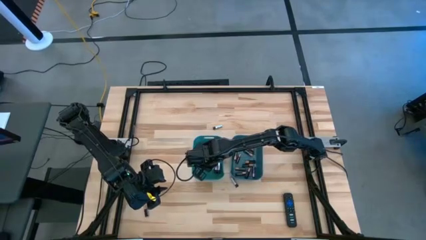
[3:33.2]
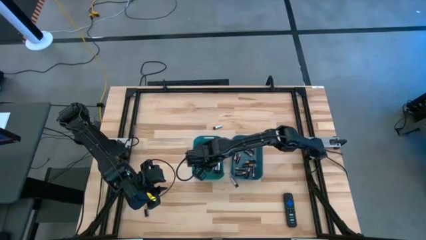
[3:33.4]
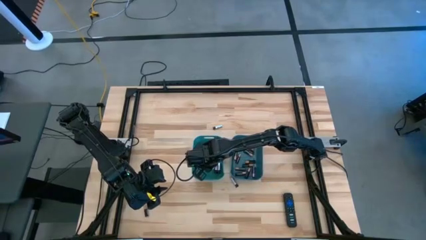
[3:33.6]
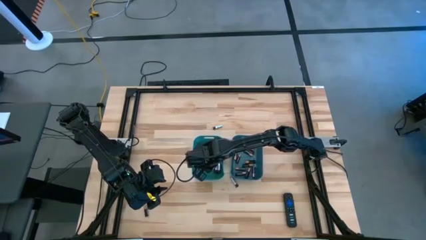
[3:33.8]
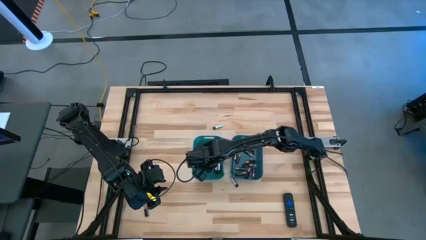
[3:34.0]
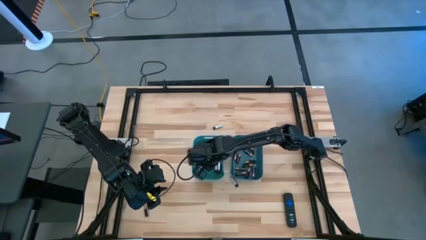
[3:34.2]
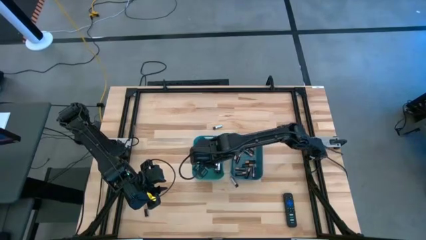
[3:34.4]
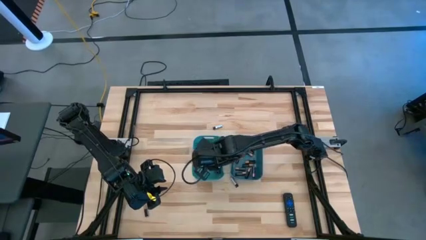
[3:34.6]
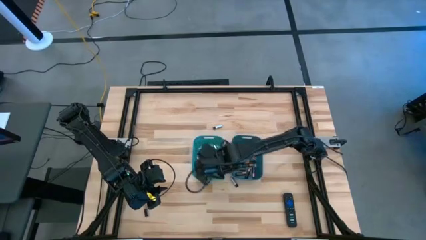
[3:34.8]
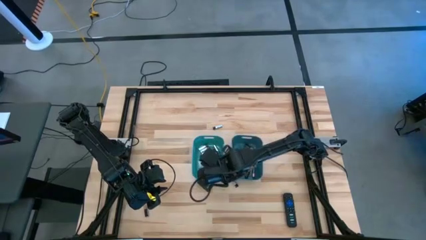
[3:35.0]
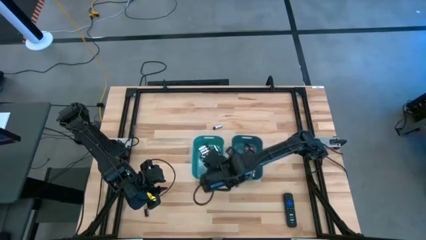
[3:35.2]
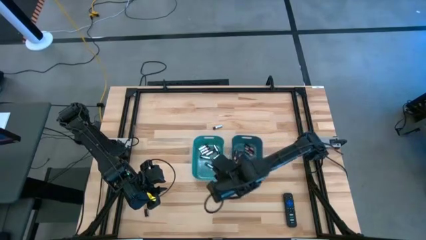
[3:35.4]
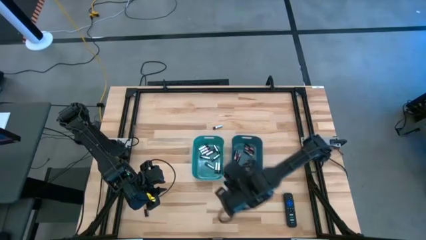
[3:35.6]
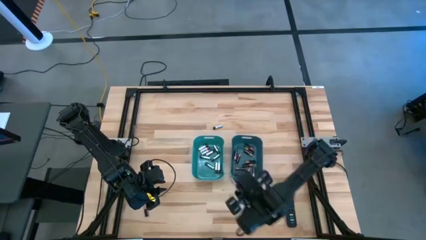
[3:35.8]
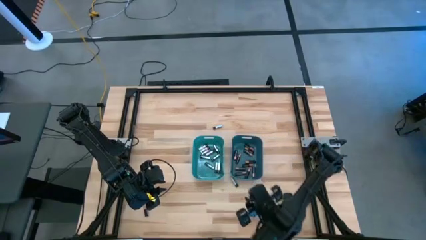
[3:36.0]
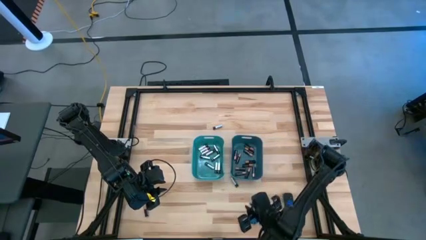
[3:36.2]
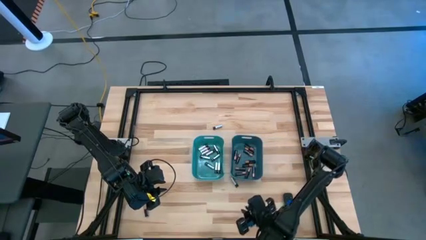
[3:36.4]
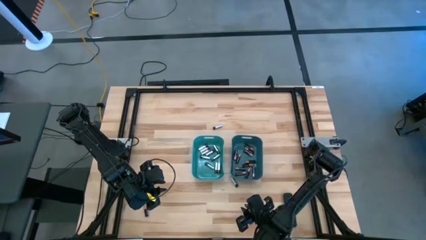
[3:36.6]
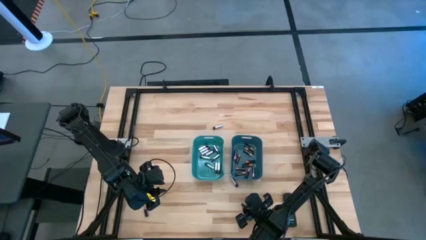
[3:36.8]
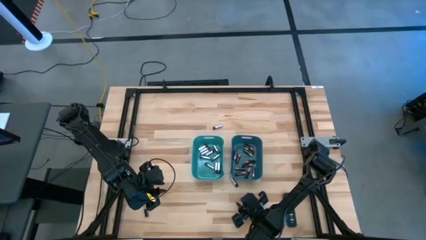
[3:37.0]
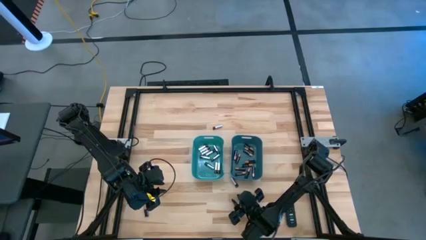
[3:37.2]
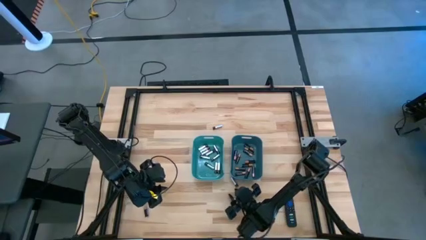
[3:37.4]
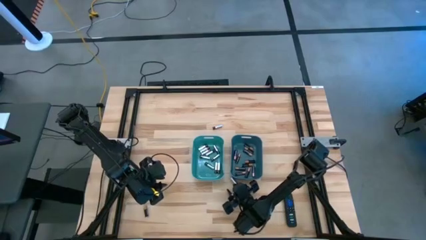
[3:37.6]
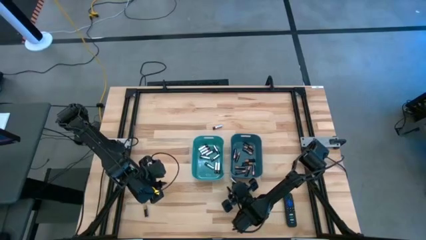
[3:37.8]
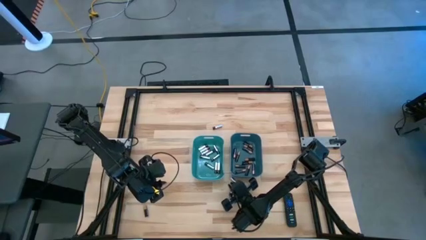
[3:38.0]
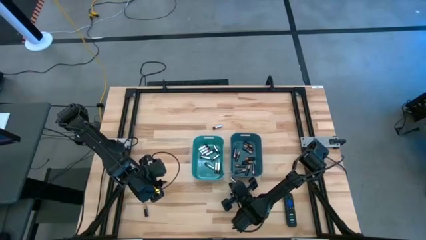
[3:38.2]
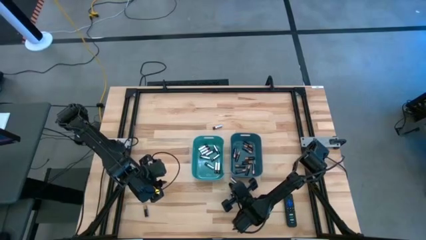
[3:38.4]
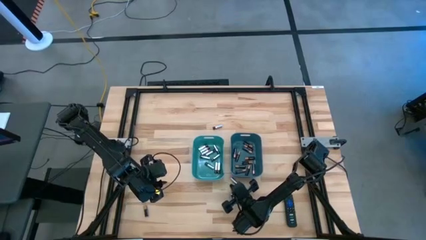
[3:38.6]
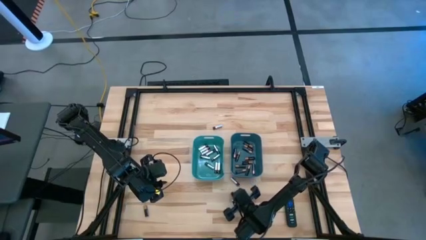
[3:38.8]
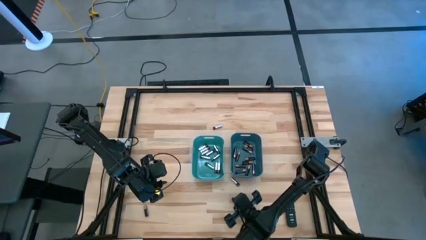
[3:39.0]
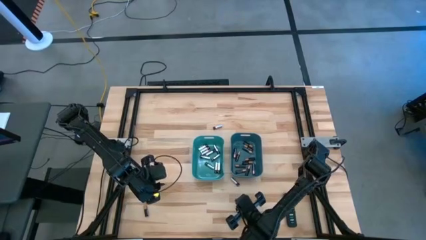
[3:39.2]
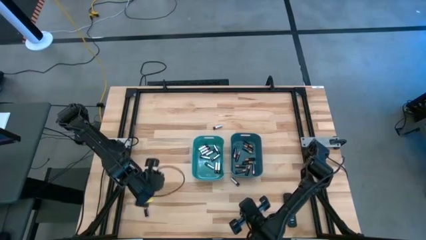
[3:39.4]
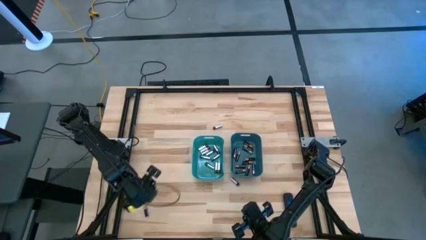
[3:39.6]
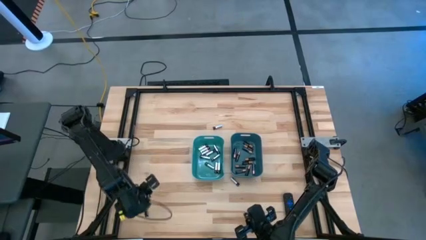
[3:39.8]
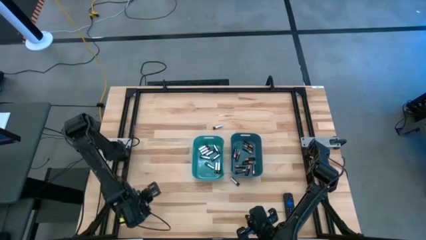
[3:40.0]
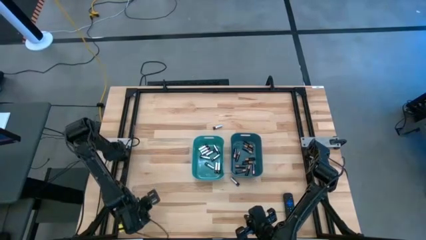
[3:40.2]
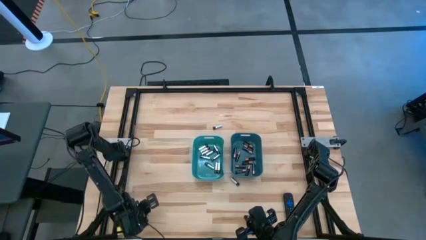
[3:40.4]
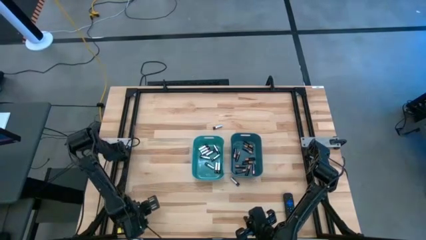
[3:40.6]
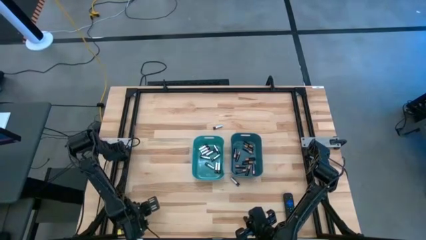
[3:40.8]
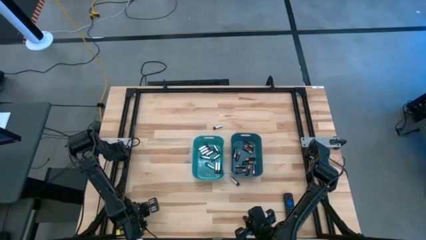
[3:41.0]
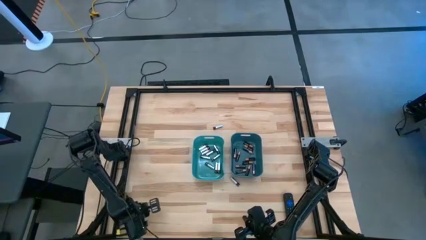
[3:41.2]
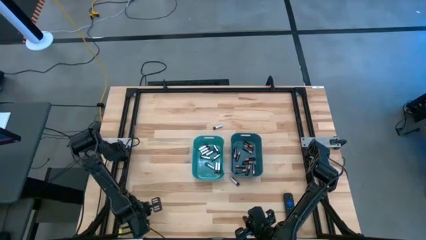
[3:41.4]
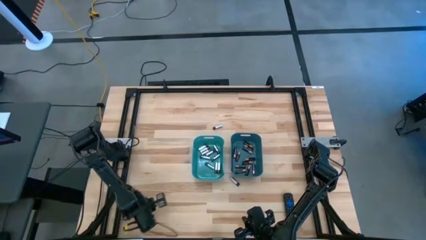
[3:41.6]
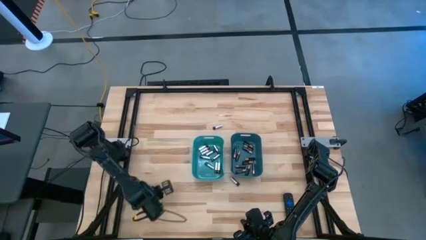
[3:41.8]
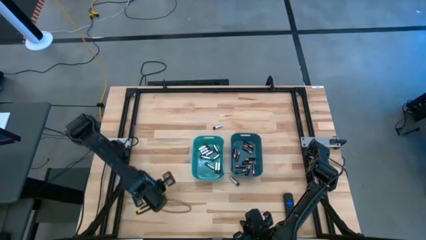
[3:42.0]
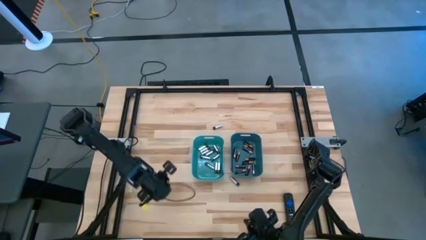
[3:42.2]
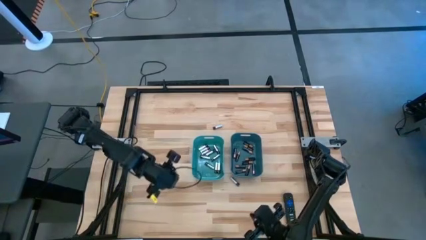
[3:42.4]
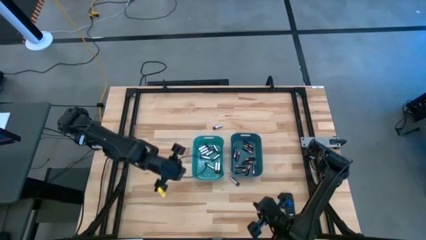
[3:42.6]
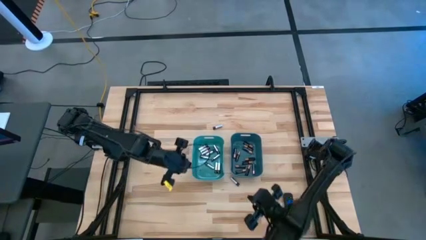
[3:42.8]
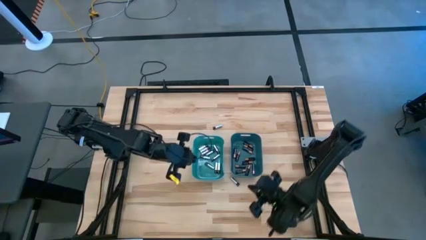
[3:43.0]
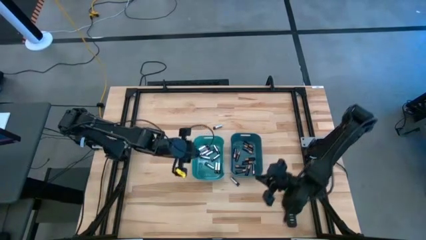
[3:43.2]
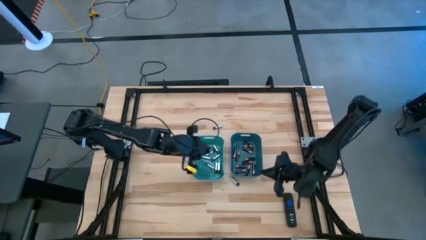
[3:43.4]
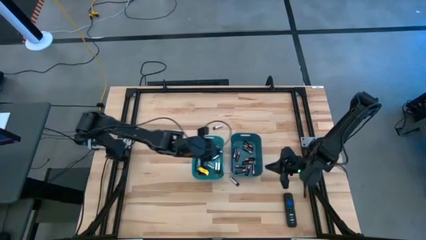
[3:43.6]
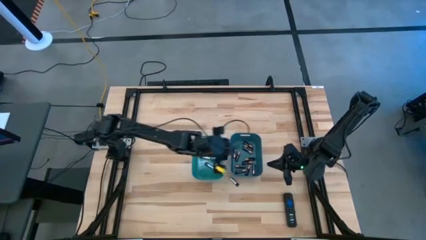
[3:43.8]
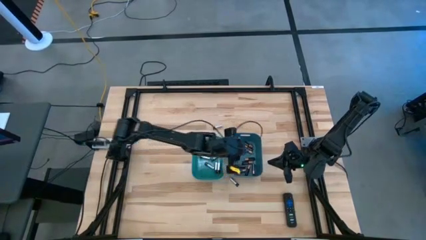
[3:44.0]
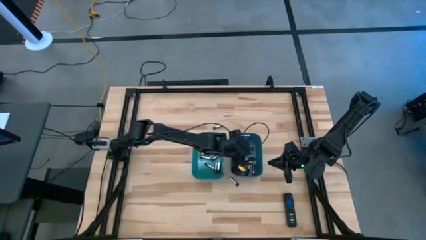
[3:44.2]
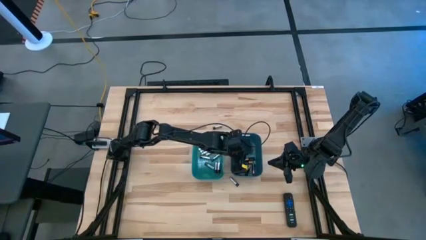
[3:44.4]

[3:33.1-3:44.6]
Task: Sort batteries
Put the black battery into the blue bin
